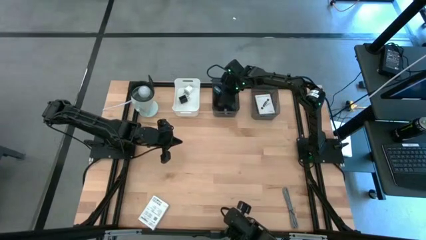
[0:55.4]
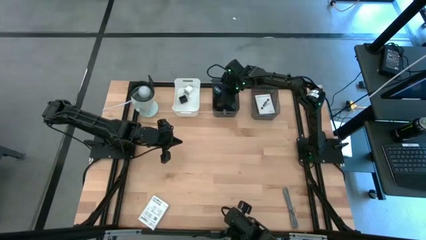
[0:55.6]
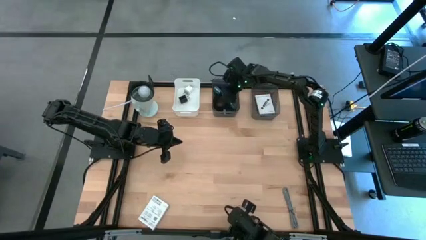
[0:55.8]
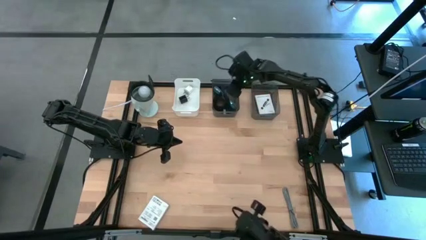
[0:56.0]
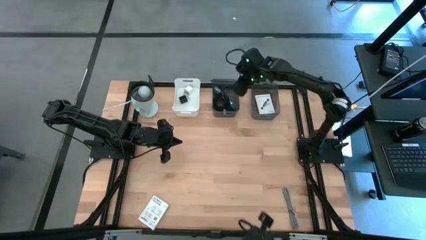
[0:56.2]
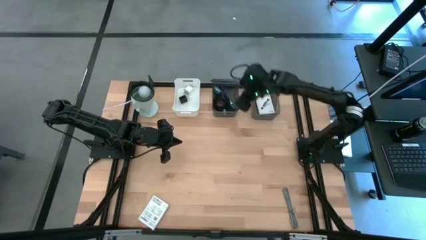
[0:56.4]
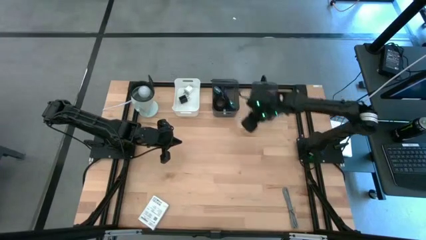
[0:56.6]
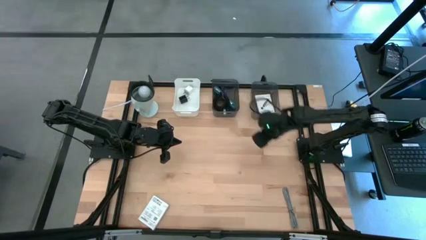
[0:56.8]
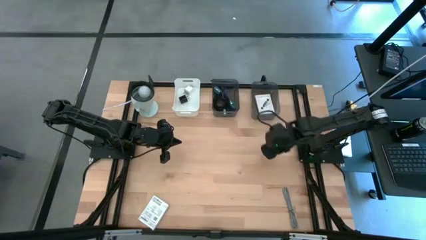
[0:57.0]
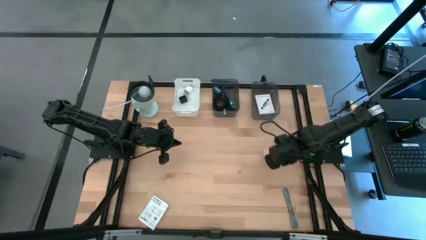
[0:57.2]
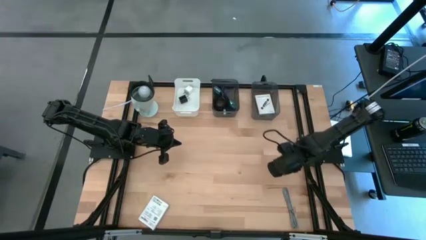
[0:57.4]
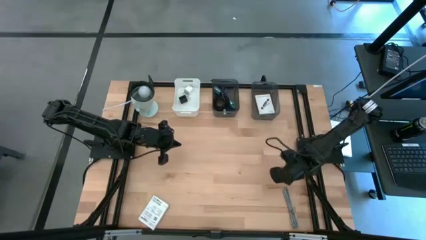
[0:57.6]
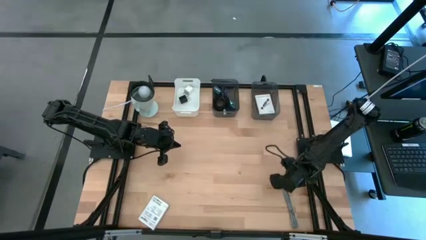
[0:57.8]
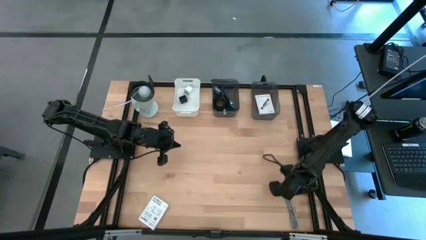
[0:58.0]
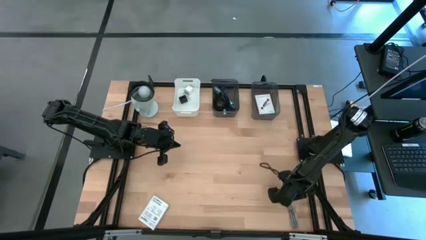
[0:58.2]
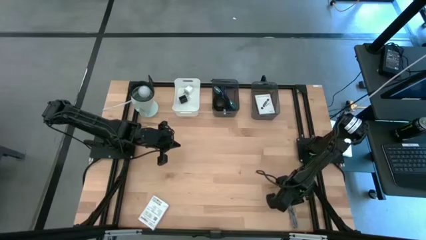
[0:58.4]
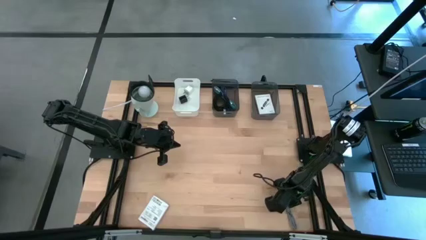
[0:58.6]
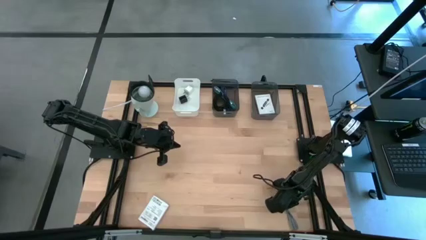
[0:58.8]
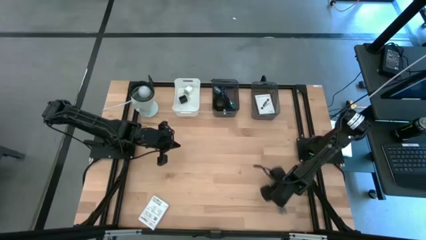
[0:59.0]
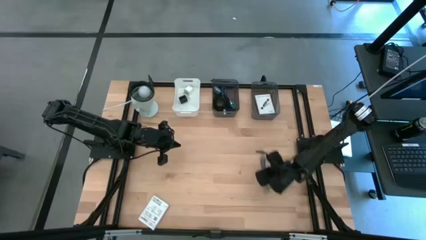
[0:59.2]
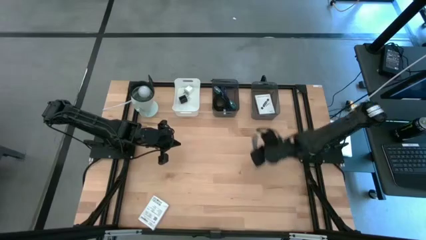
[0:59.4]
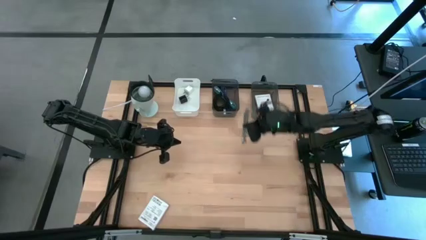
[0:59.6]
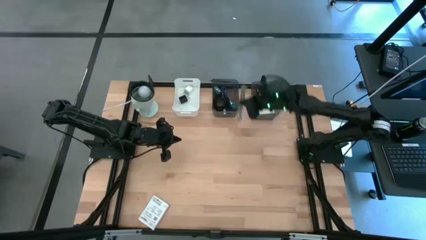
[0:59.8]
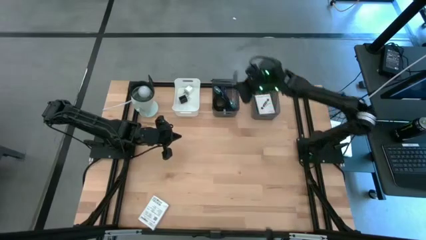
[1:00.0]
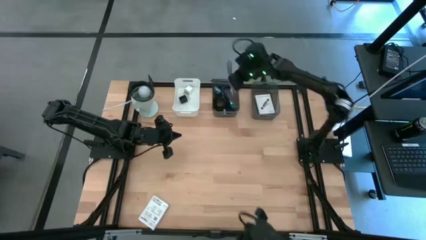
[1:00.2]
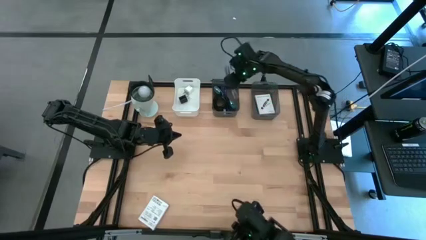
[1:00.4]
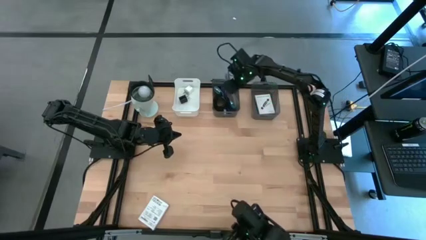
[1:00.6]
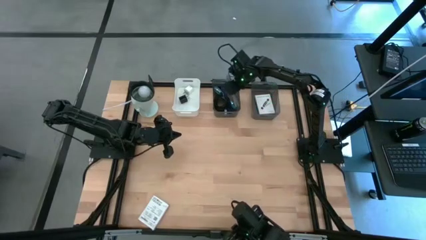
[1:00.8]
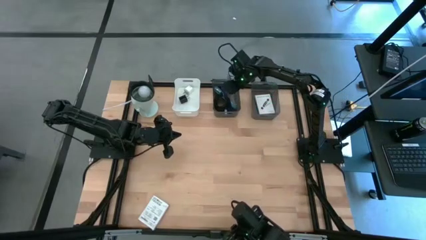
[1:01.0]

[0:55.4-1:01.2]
Task: Pick and place items into bin
Put the gray charger cable into the left black bin

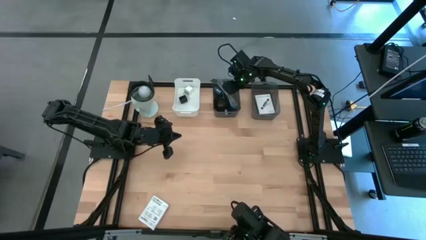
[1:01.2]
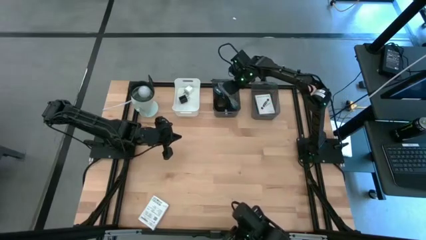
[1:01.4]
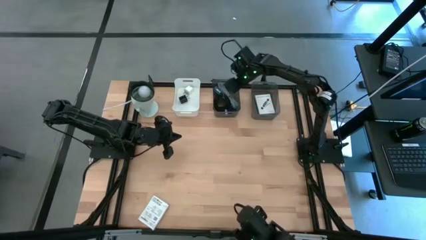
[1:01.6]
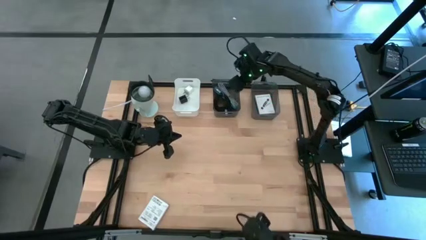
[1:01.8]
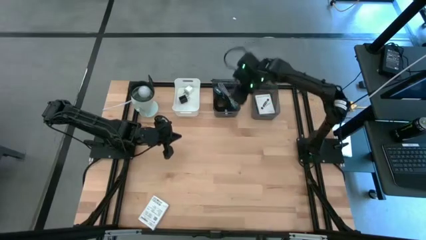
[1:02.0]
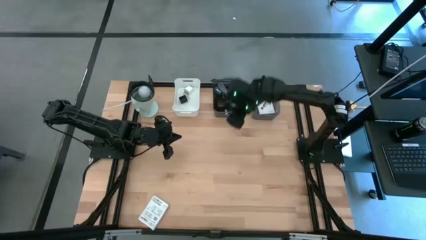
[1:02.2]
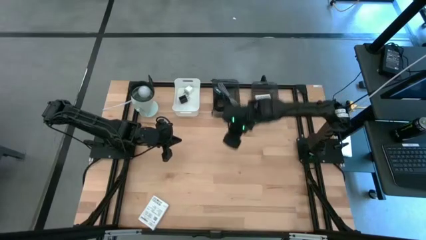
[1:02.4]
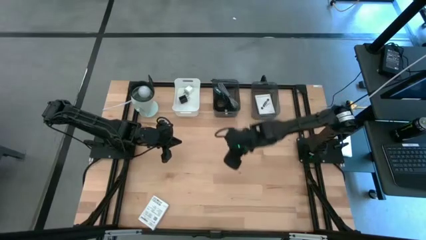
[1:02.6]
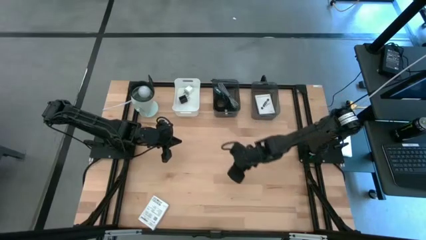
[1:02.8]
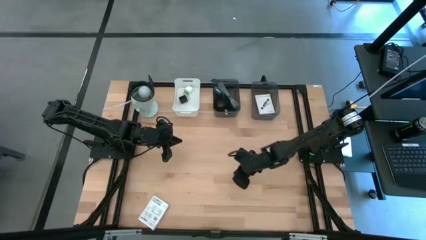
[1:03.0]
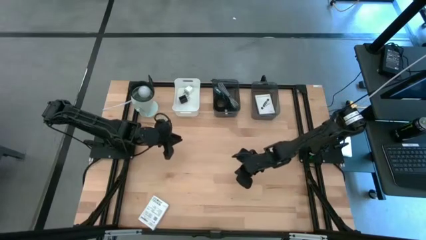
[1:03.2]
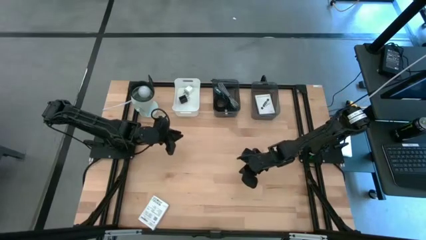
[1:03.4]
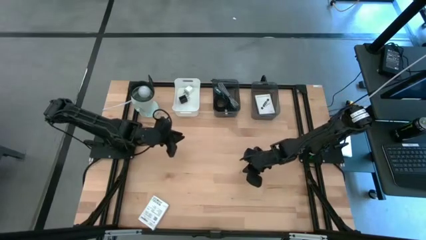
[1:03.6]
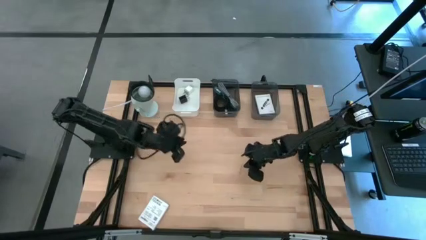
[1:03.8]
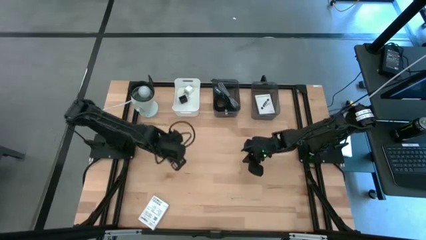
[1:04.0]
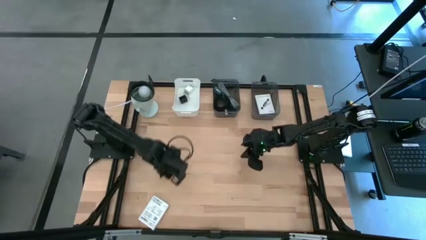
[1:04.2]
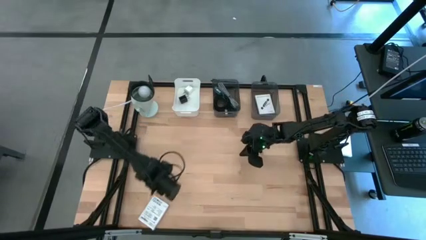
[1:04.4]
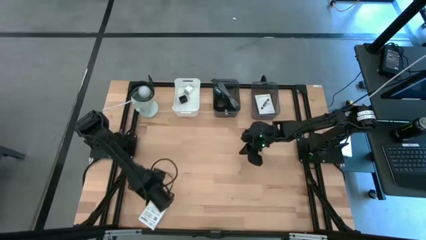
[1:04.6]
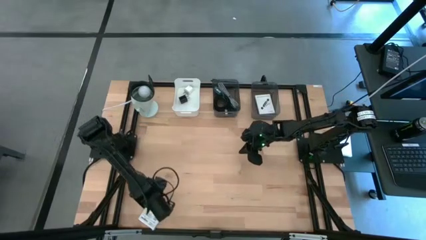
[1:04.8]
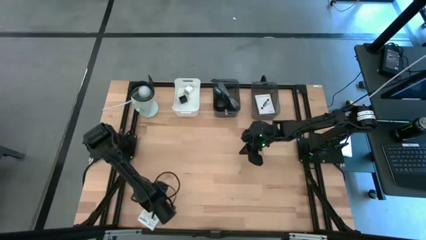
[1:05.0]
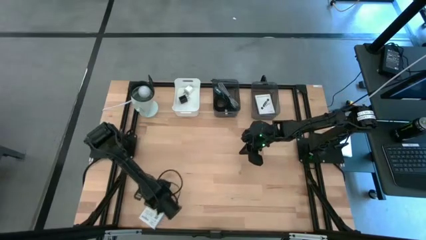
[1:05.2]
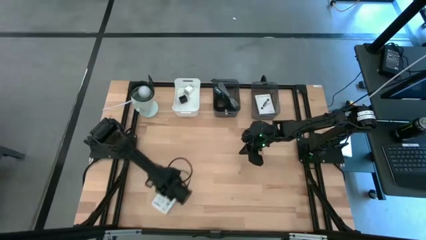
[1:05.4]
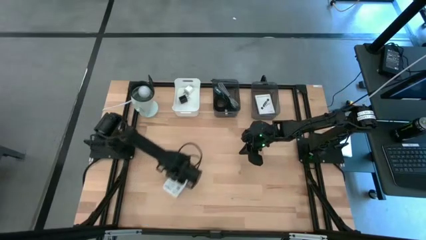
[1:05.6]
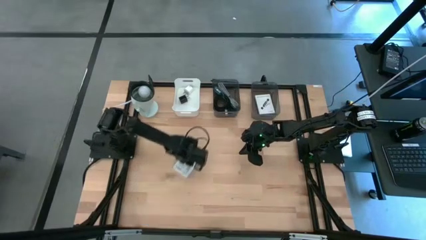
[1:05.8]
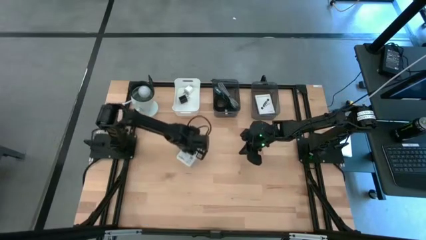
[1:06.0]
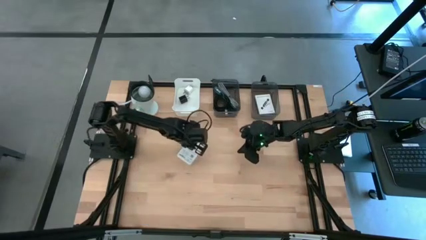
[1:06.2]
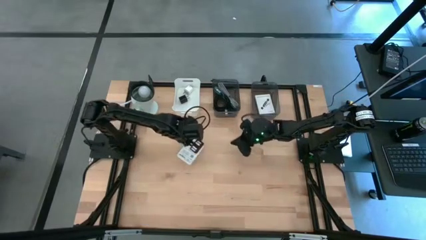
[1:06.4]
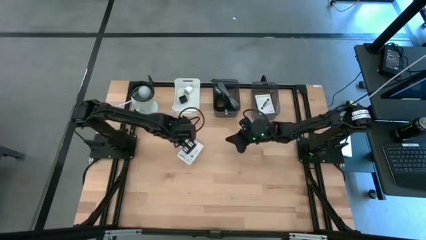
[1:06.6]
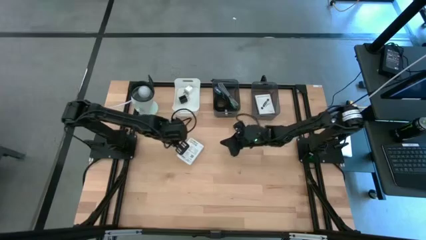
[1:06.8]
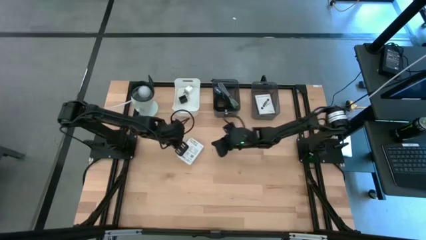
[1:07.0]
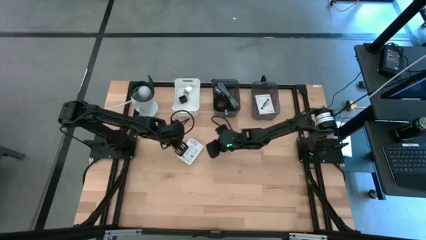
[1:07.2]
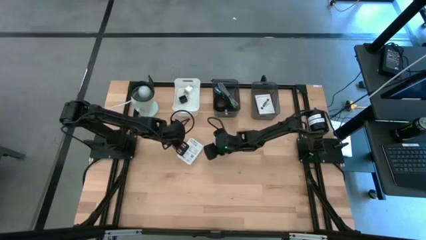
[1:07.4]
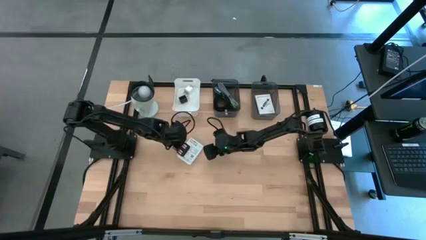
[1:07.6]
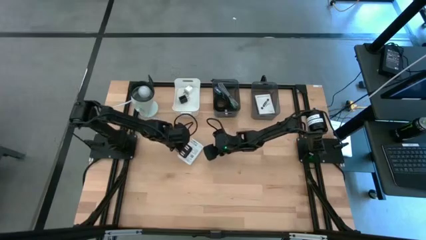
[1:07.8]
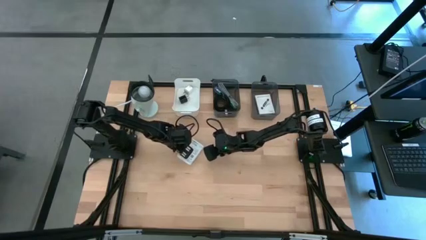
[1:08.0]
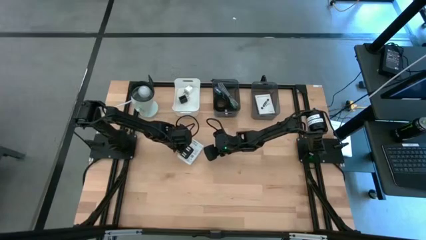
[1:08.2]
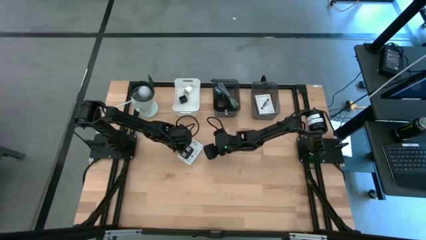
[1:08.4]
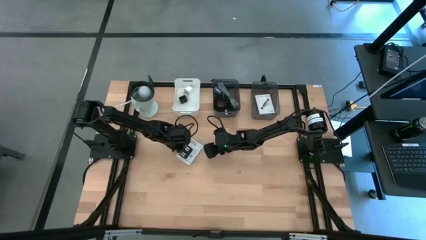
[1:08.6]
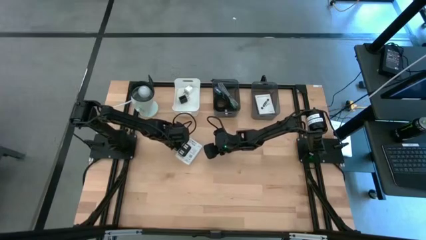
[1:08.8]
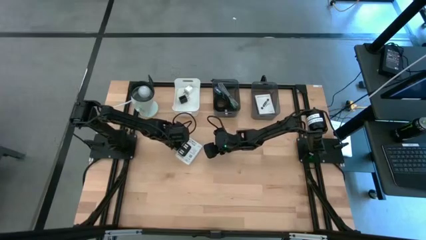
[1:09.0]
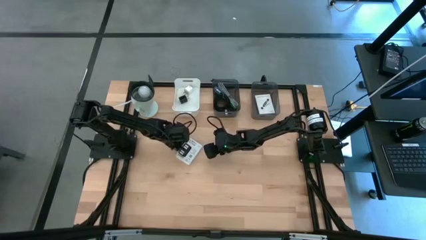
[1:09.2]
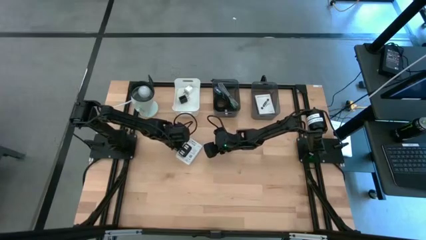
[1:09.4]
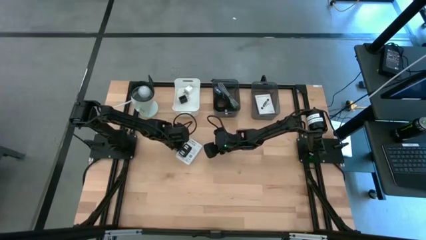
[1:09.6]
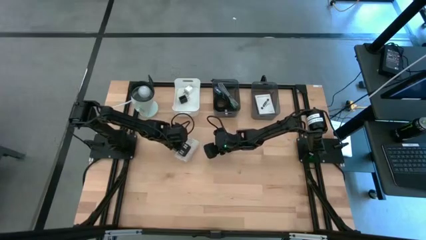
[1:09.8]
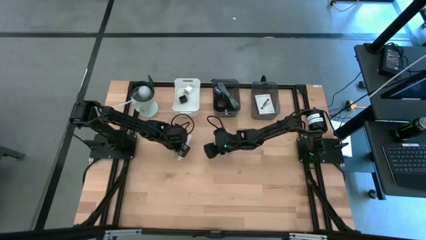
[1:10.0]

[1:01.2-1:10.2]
Put the card reader box into the right black bin
